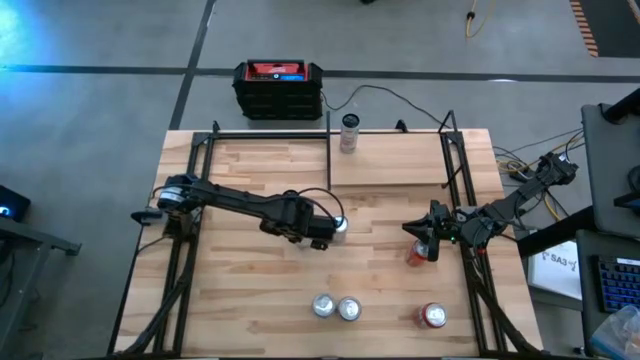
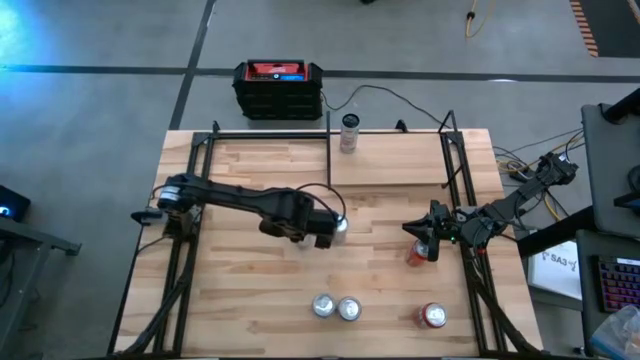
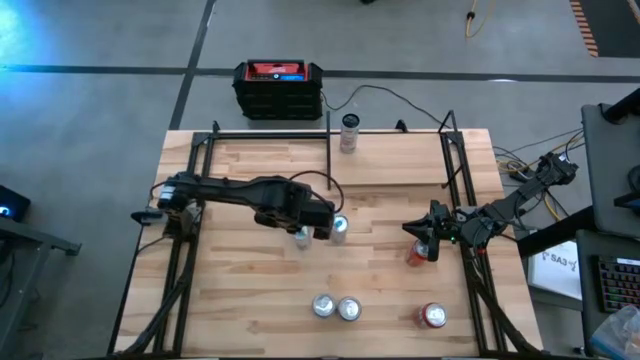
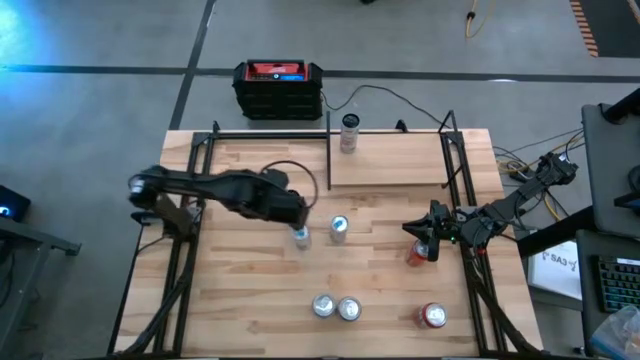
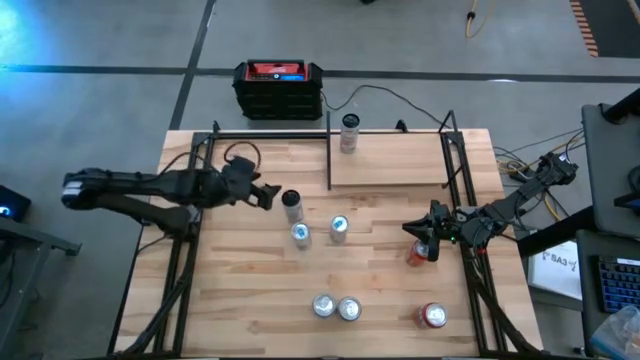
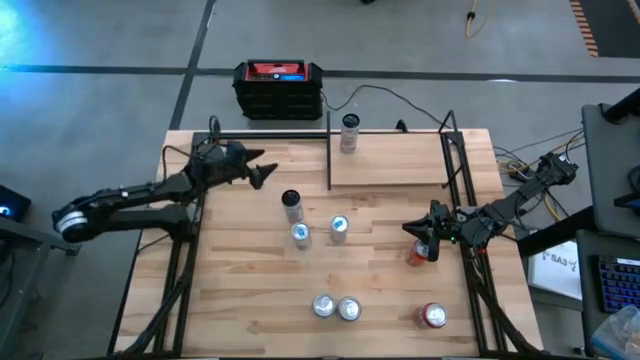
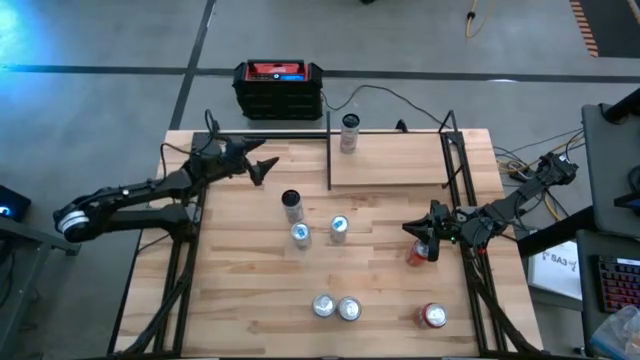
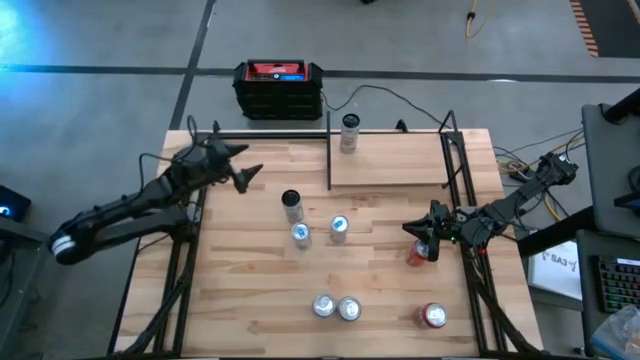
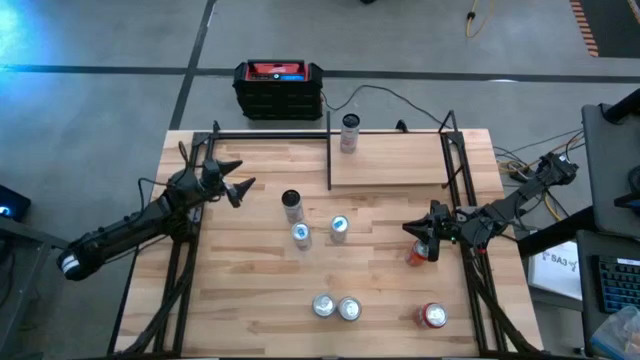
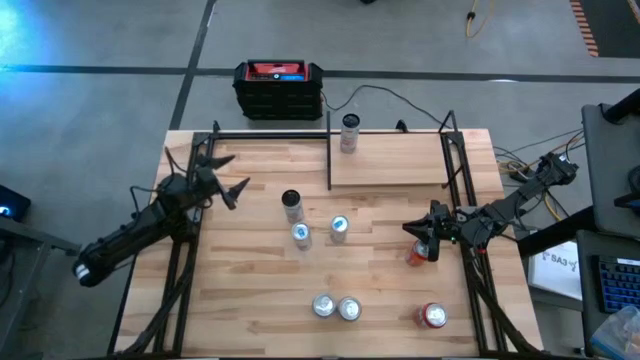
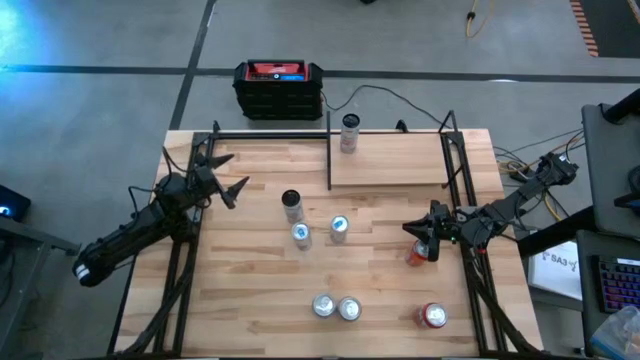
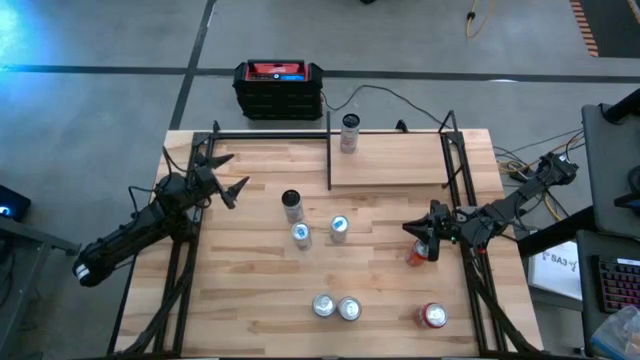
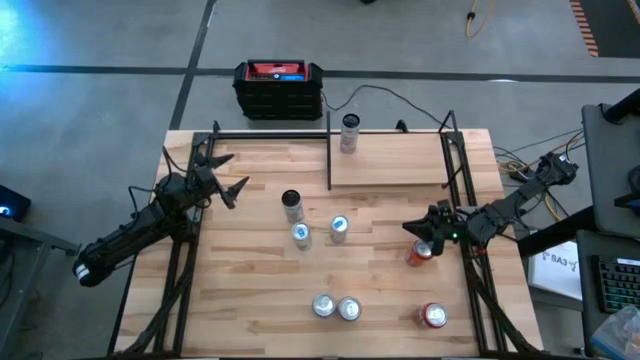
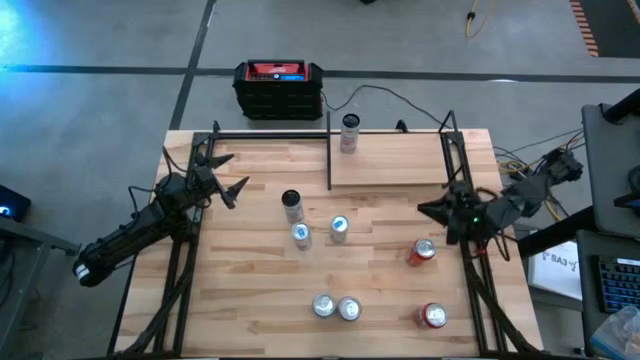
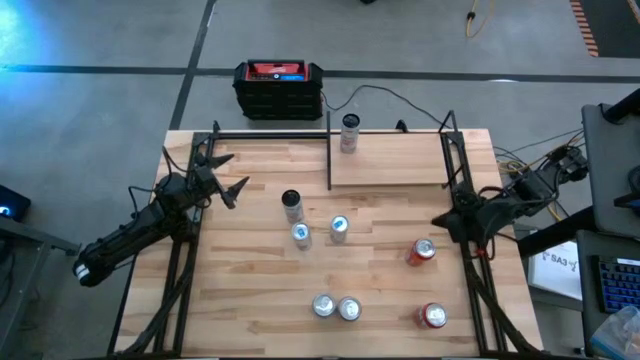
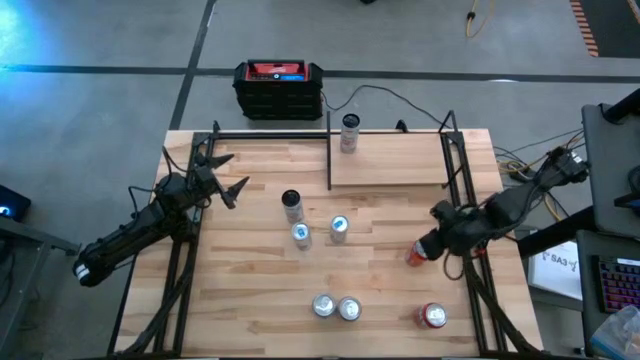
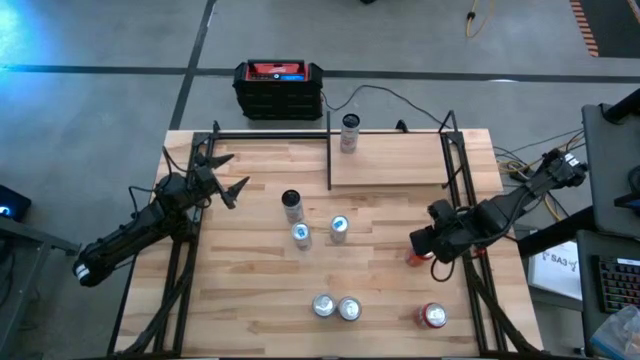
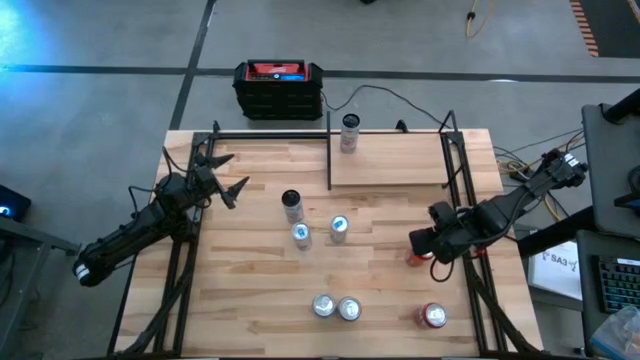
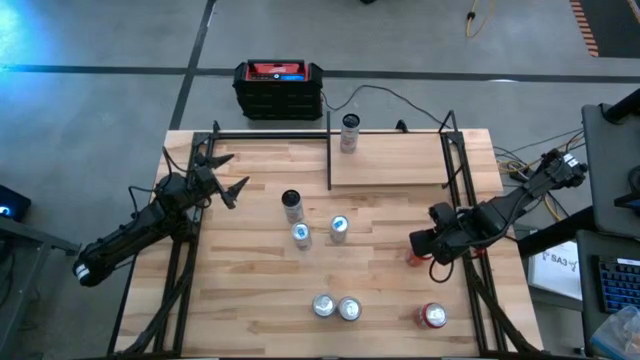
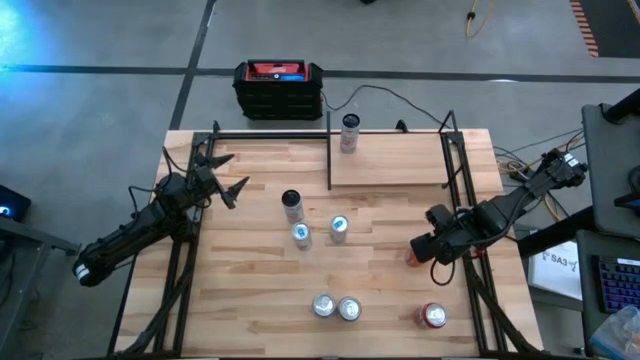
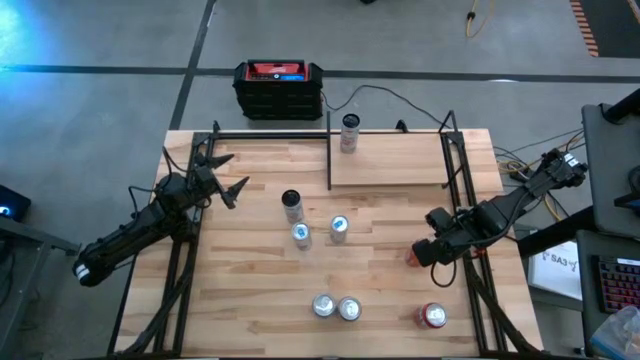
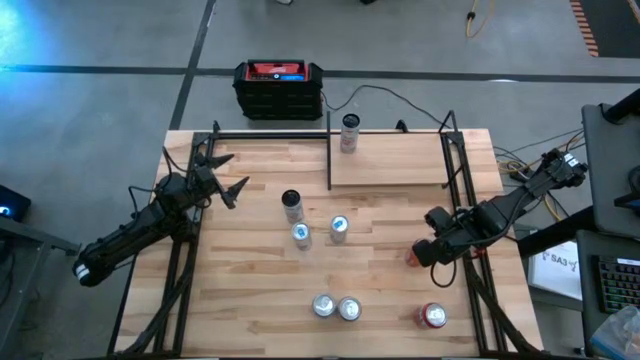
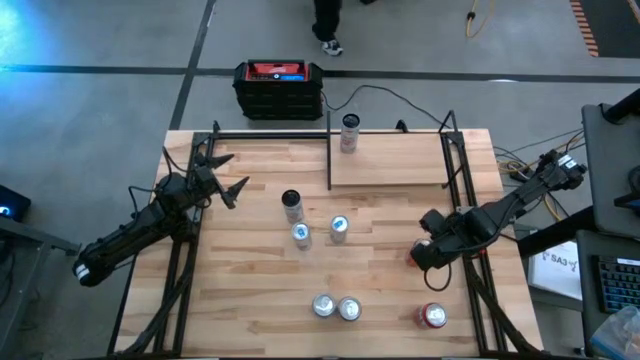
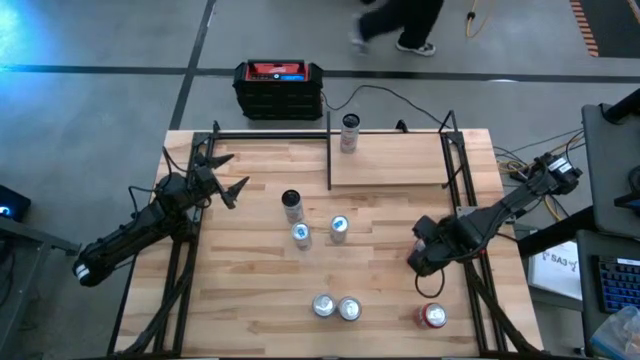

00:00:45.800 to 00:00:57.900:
Task: Place canned beverage on shelf
Put the top red soda can on the shelf

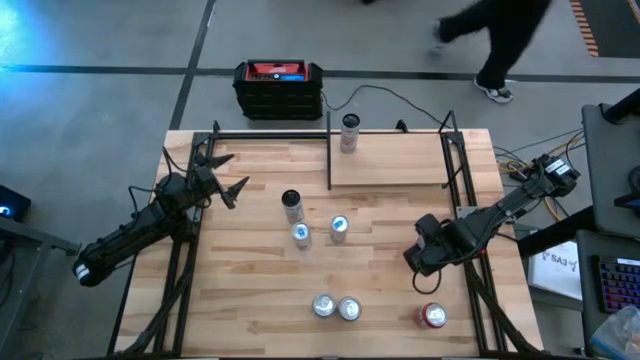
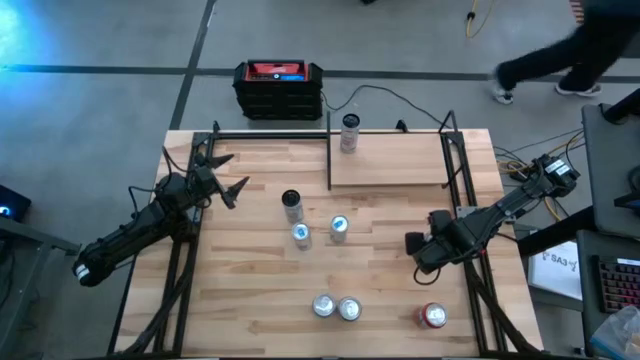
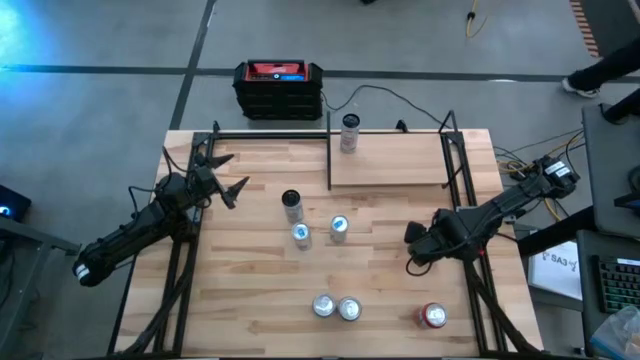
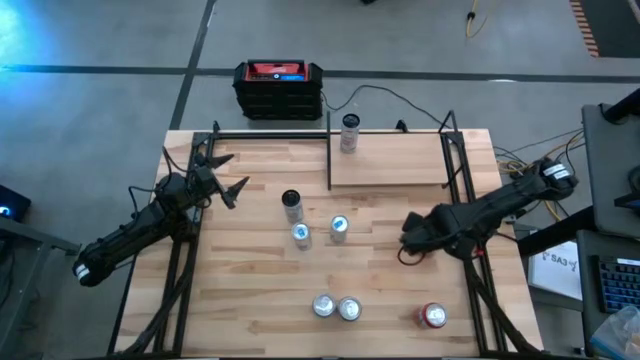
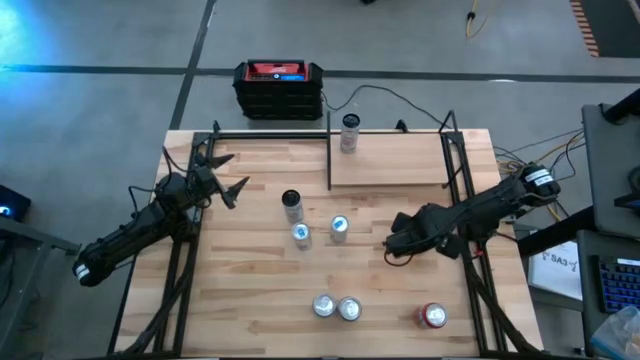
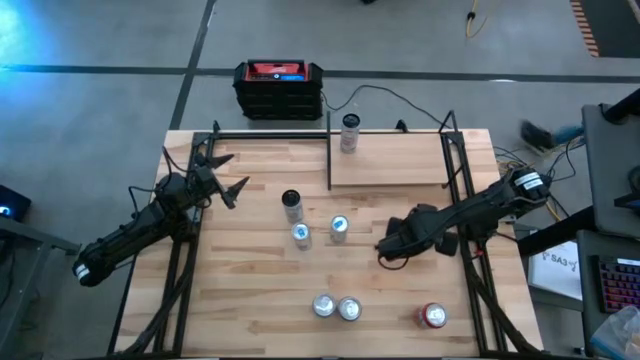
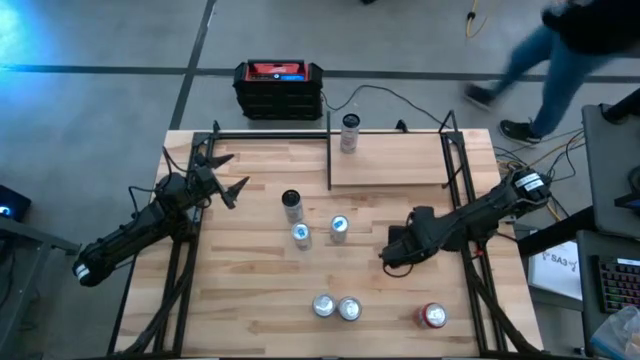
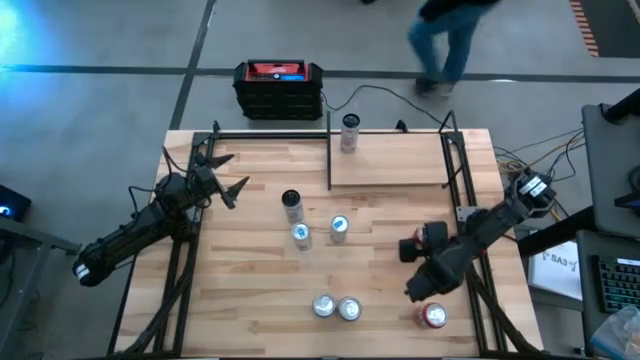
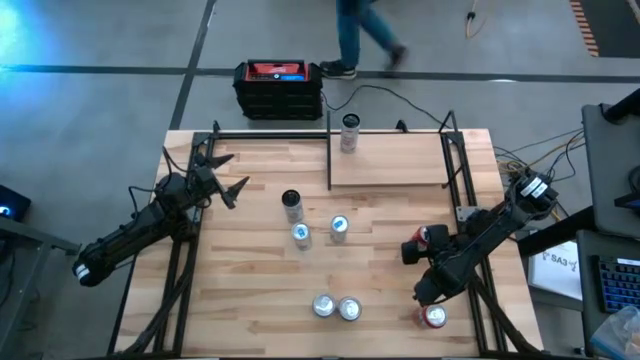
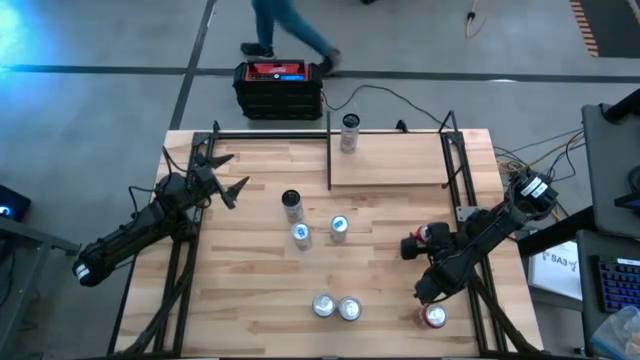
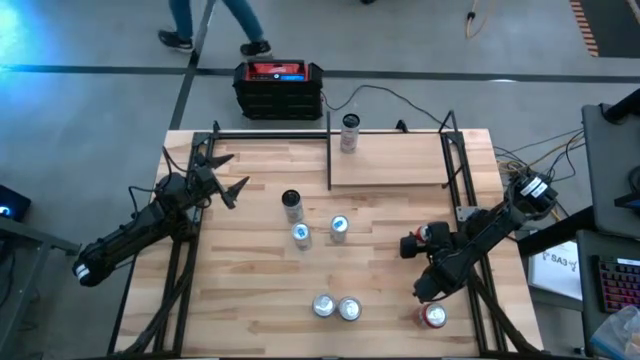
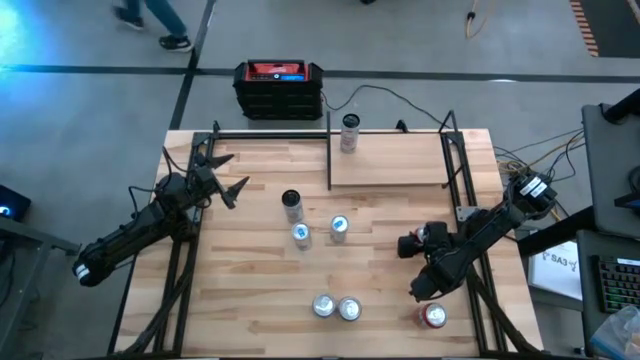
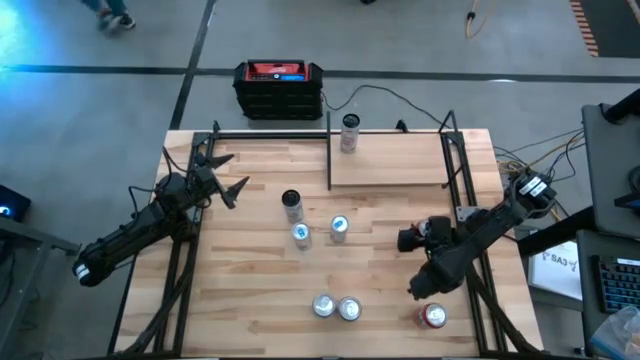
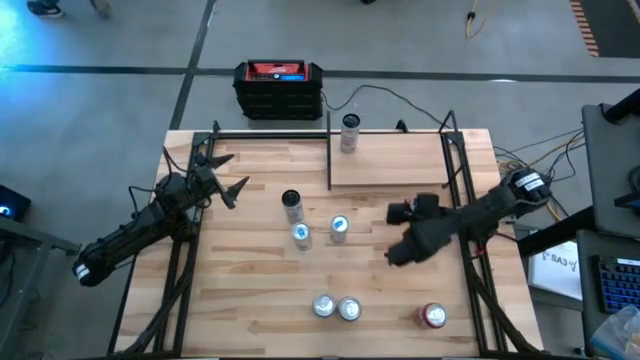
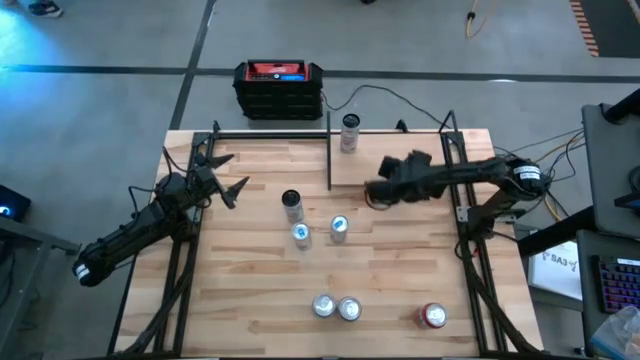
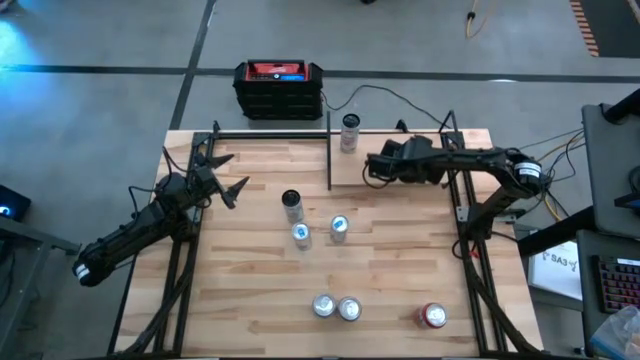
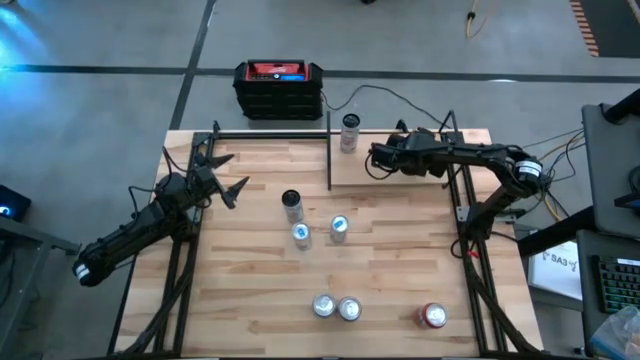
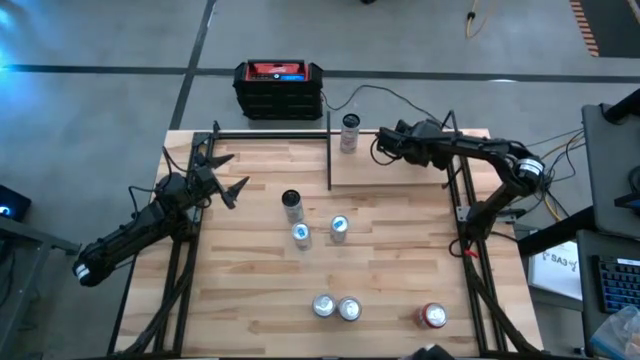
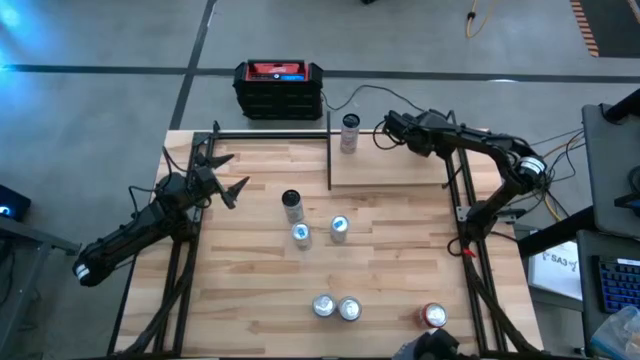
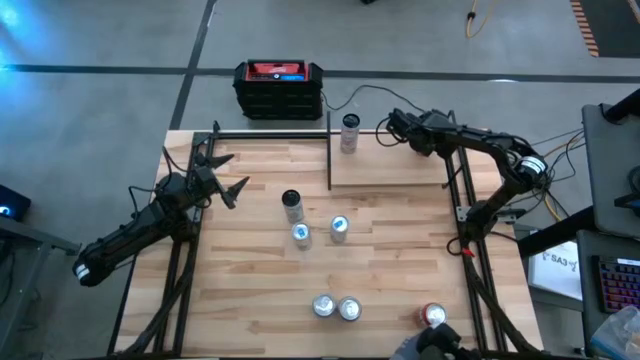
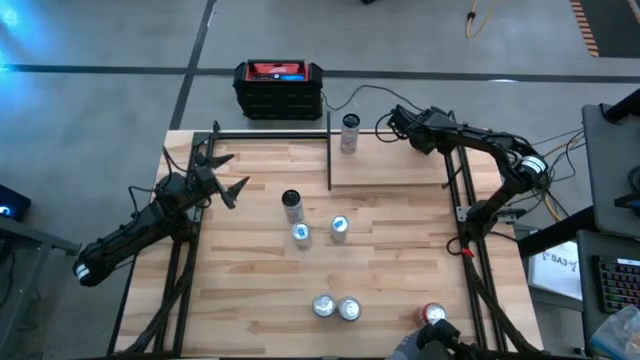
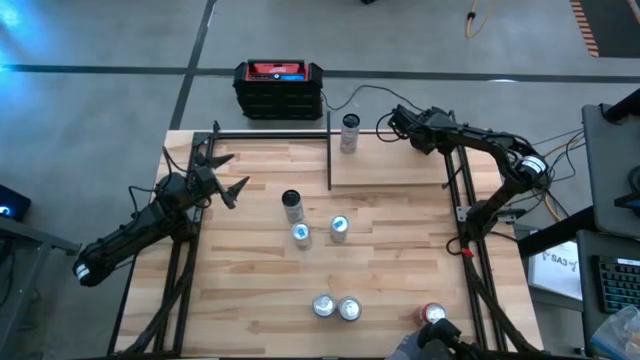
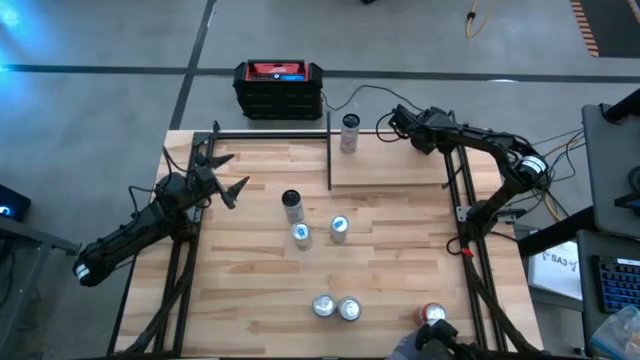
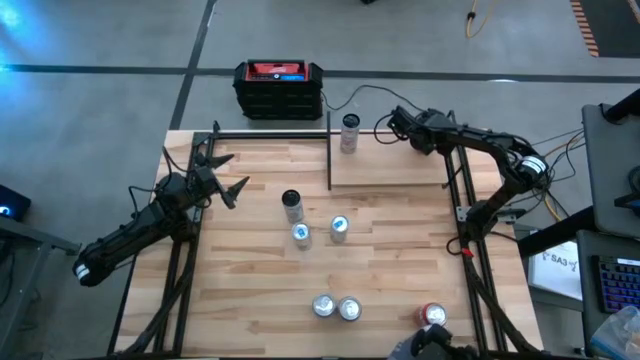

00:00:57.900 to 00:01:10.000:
Put the top red soda can on the shelf
